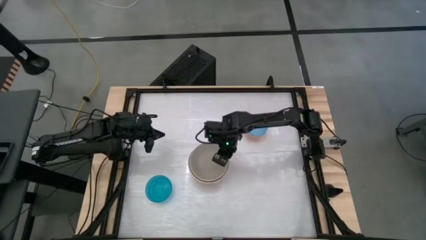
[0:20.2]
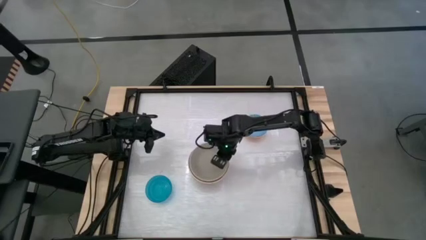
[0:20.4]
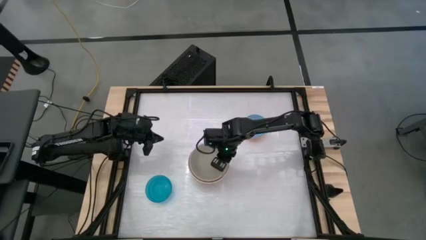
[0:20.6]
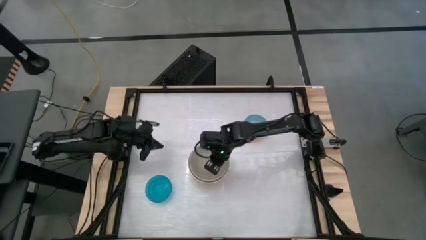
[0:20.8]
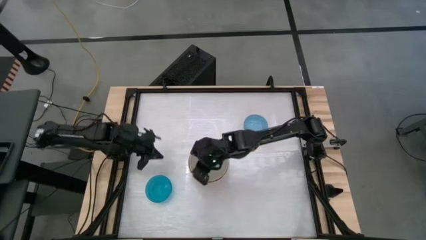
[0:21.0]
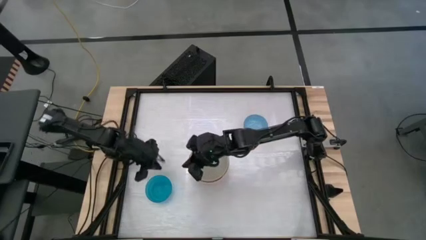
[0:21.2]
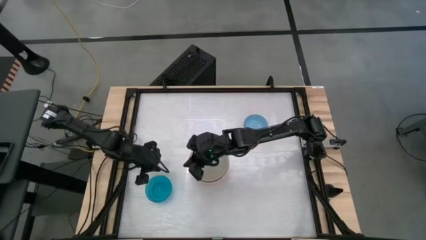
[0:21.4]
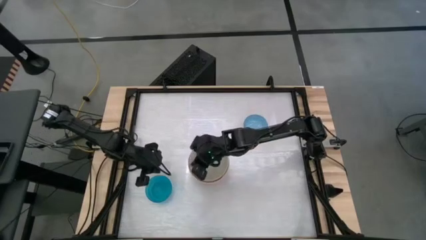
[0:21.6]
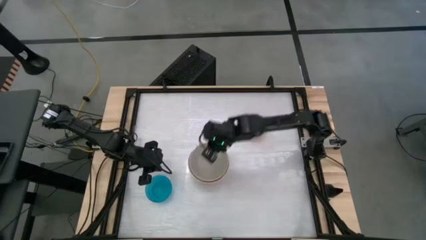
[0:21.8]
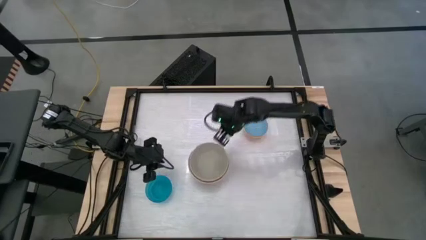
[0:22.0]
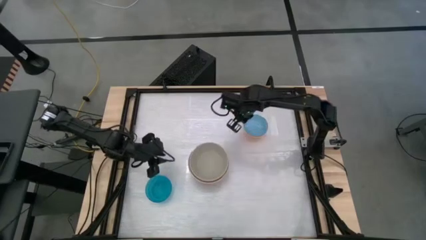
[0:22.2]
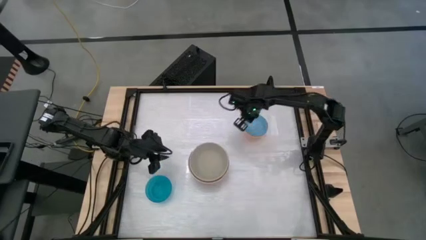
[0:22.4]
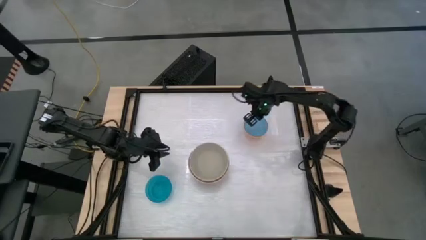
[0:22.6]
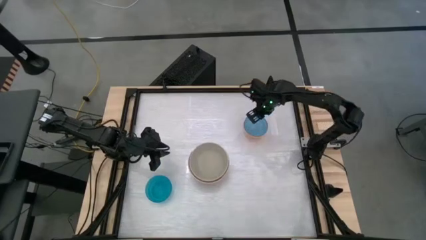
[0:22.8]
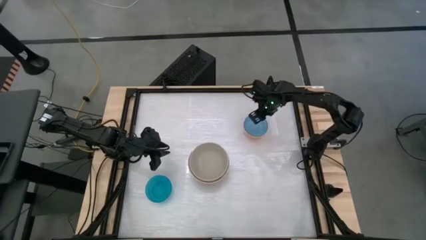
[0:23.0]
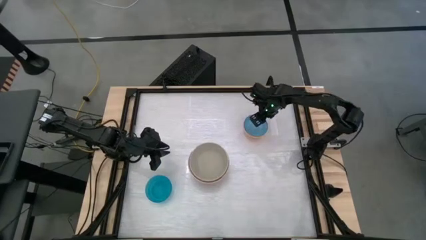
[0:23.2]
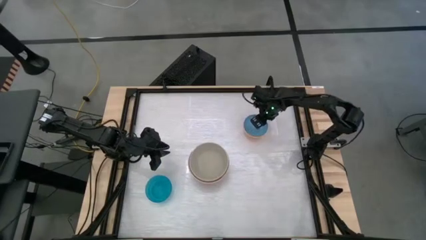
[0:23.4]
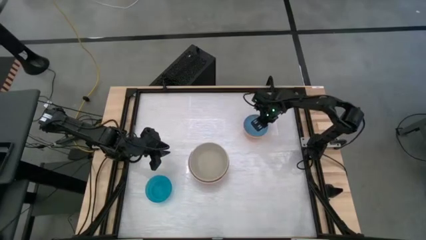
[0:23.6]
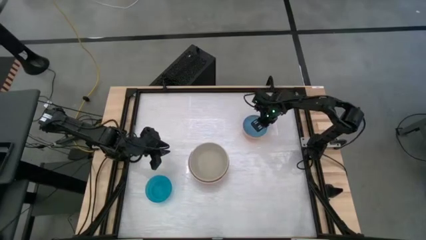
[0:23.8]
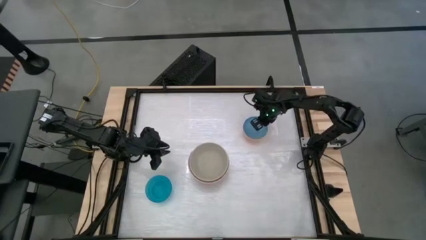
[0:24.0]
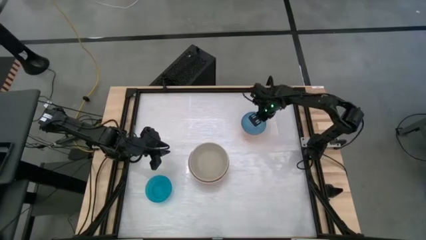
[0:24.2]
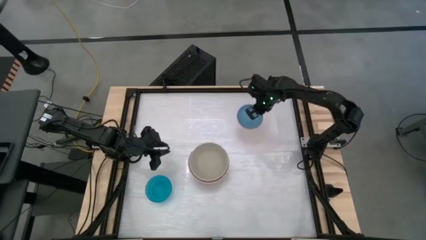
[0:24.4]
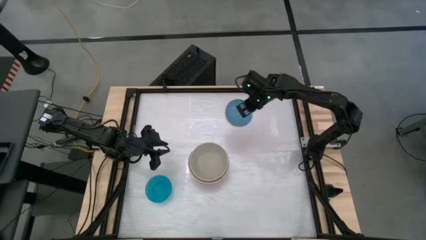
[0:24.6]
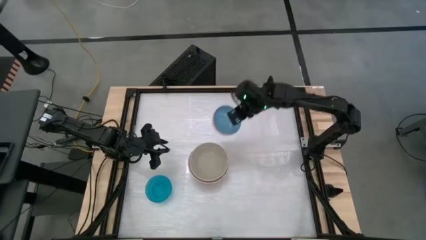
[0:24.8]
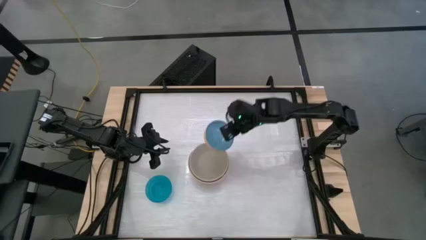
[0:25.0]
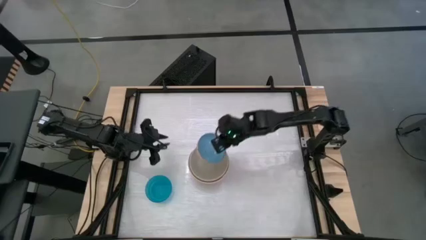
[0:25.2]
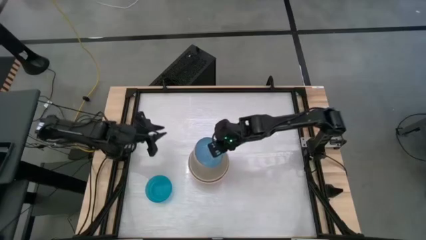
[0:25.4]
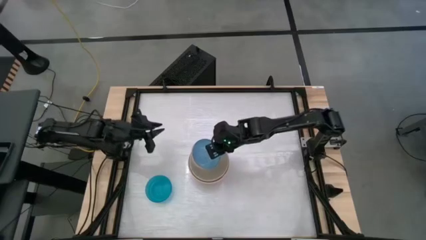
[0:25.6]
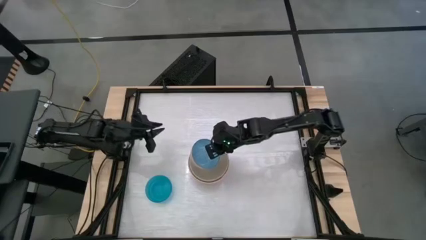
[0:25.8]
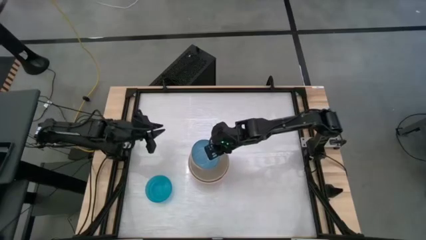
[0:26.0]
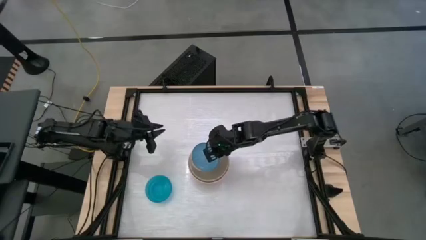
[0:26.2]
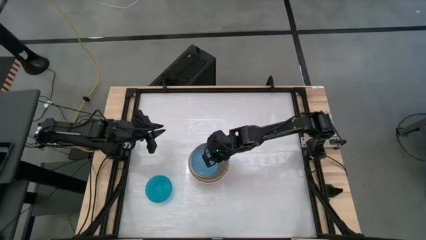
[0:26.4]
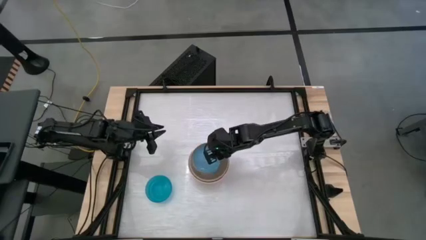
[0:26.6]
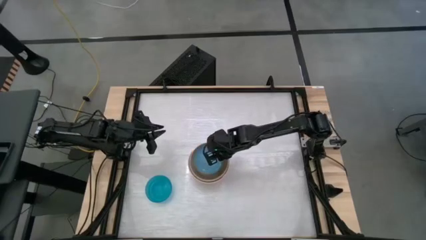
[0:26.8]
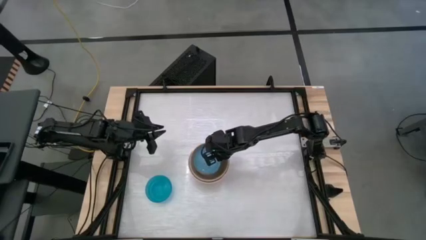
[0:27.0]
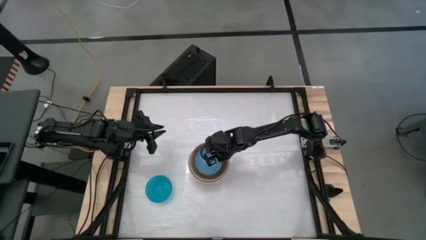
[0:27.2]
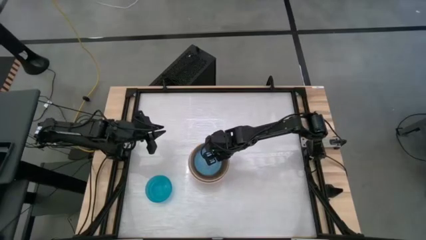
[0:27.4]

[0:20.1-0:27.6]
Stack the blue patterned bowl into the gray bowl

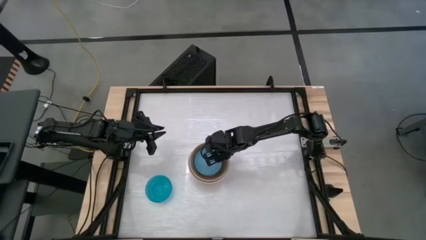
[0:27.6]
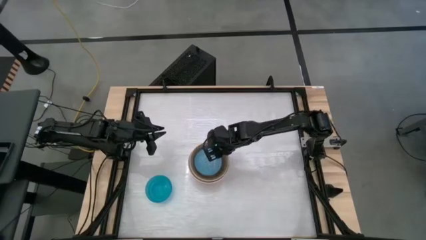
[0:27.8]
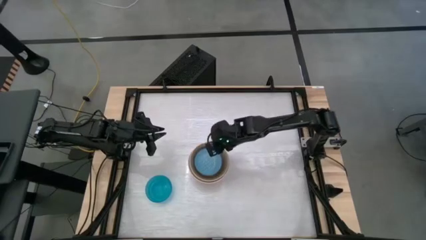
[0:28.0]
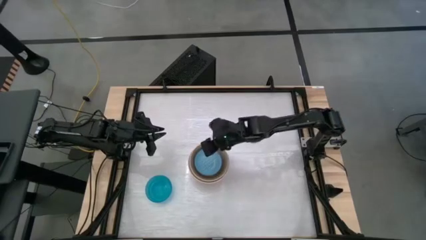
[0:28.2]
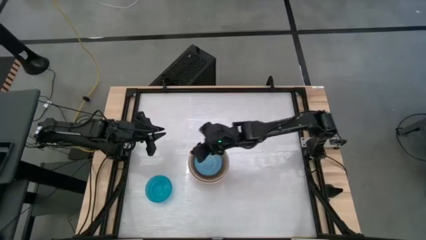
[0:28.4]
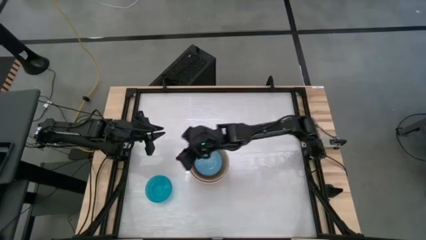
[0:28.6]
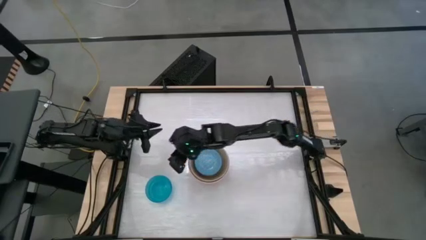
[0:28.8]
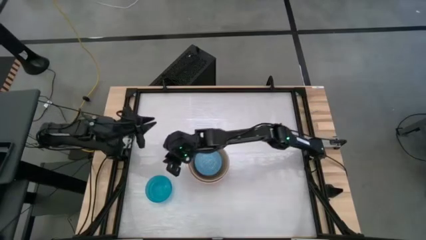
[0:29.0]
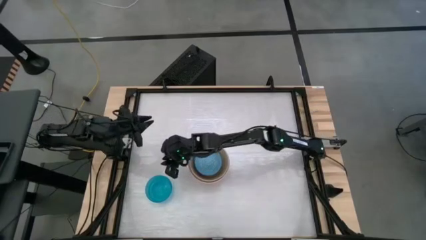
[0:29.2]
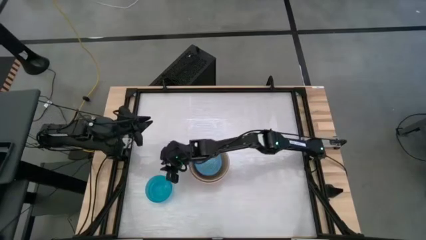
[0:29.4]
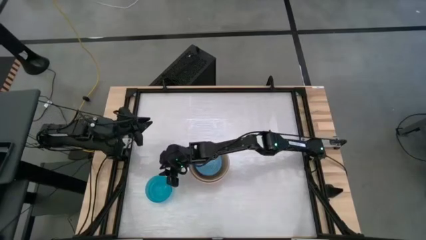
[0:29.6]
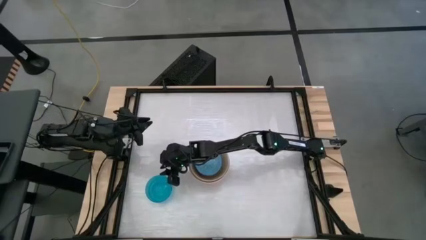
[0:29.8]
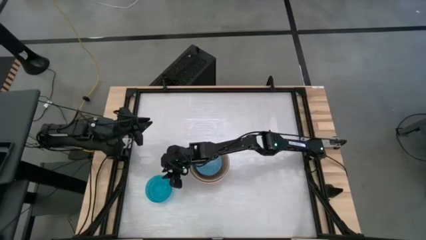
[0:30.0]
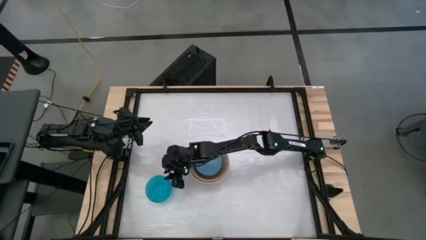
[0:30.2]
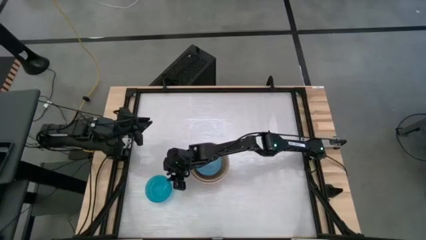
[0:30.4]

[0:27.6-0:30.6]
Stack the blue bowl into the blue patterned bowl

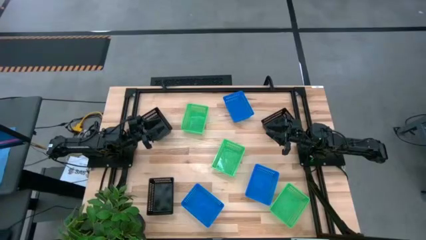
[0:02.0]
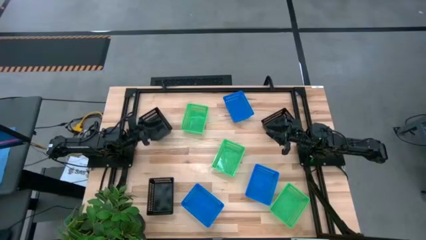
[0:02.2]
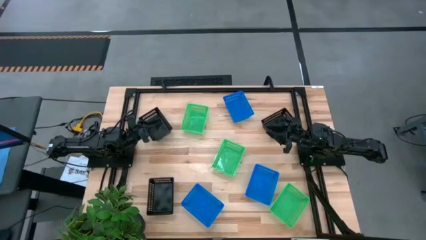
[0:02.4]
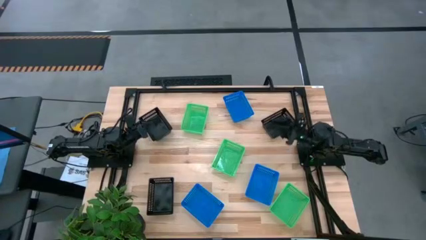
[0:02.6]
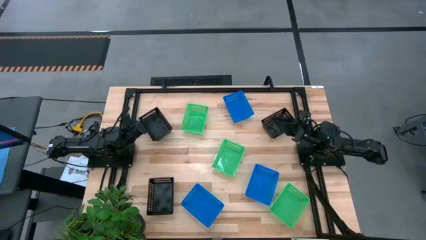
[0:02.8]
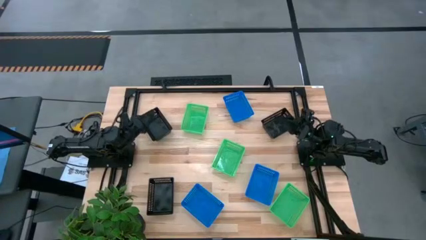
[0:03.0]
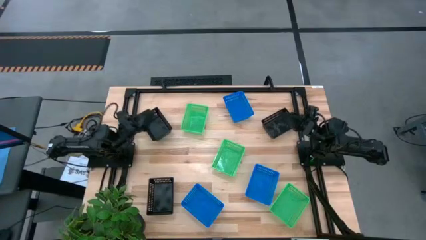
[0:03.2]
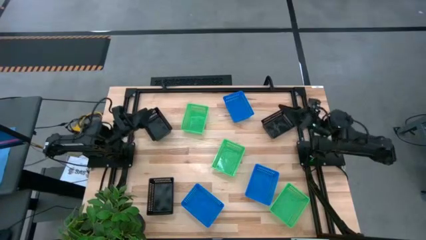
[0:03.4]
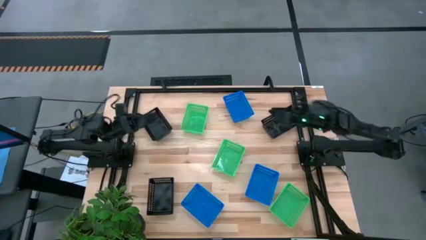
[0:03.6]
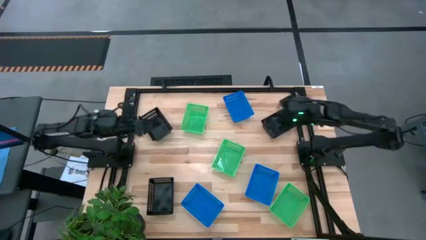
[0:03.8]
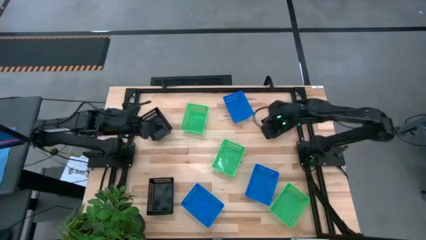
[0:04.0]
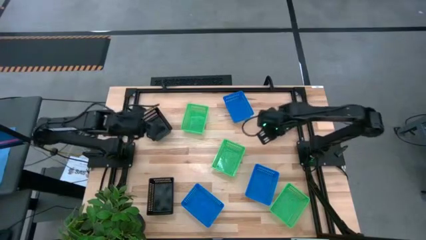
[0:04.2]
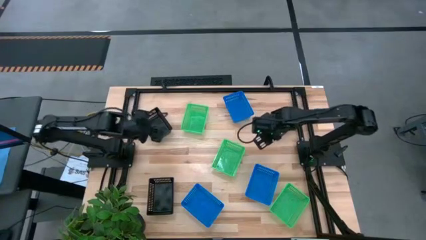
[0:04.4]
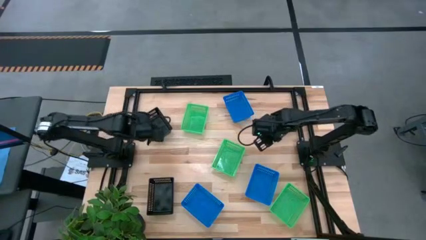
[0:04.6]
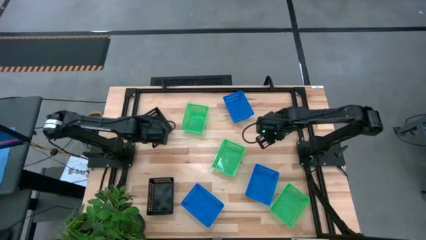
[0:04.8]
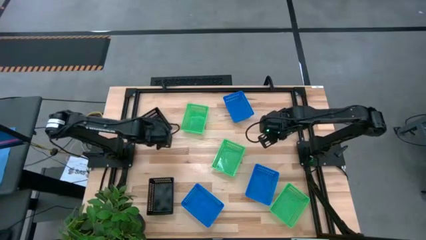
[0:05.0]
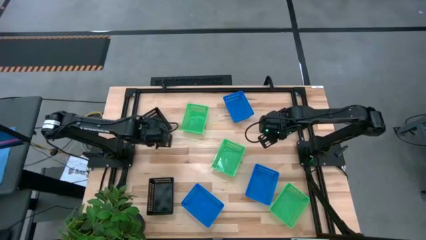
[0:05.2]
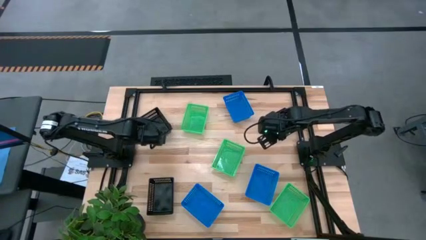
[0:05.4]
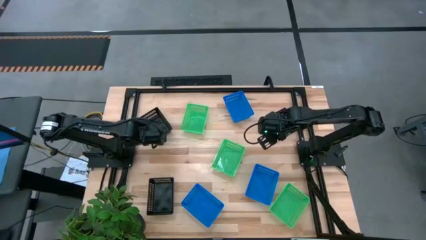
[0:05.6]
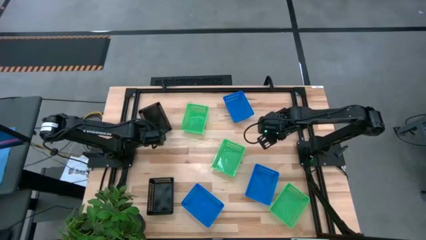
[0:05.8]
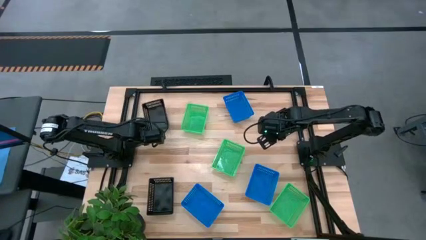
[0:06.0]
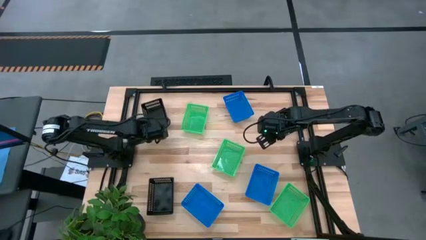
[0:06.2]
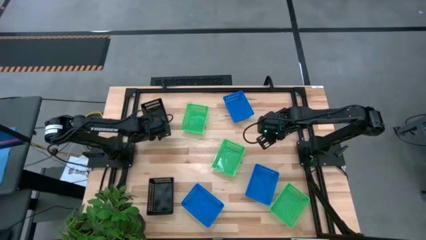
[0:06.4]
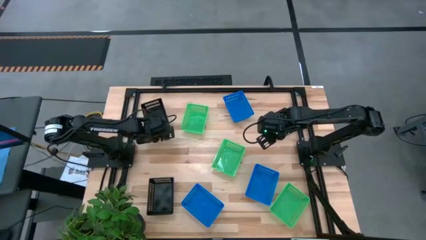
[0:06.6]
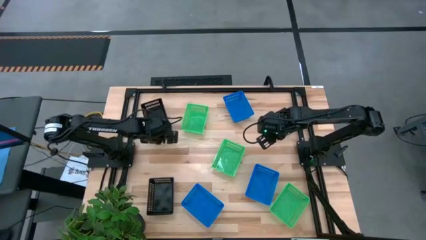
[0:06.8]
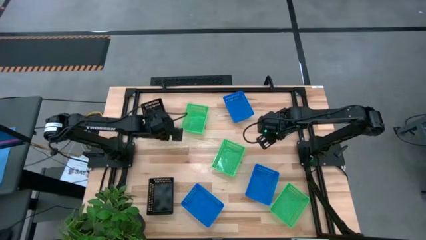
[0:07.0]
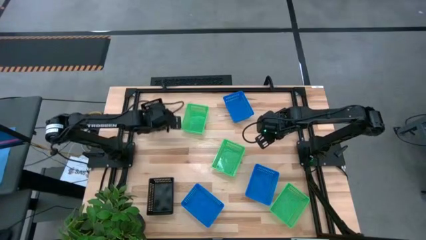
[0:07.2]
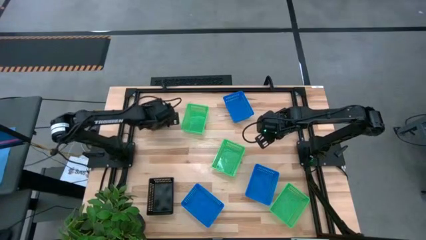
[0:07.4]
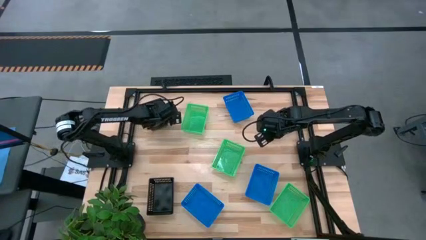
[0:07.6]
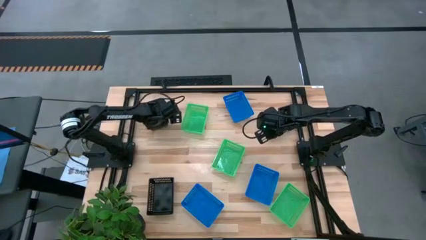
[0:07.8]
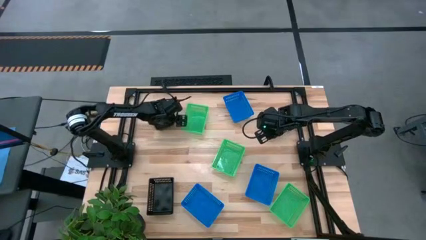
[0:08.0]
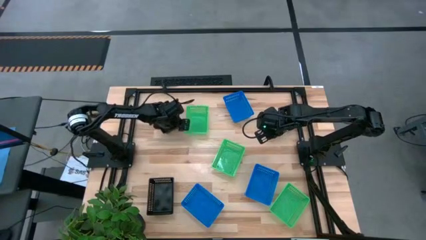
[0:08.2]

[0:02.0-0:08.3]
Adjust the top left black bin
